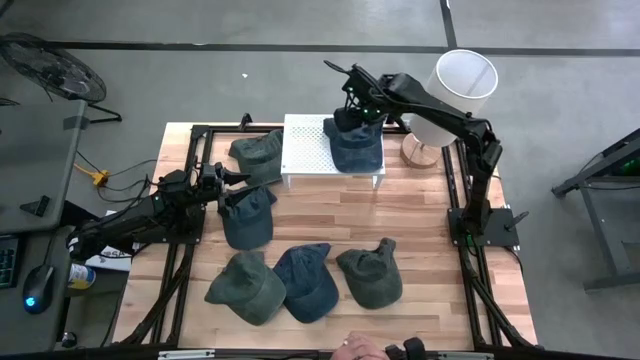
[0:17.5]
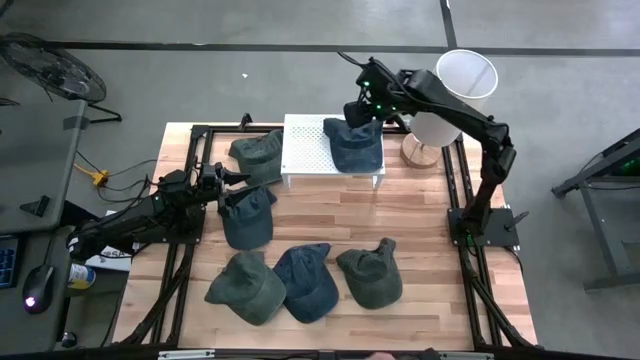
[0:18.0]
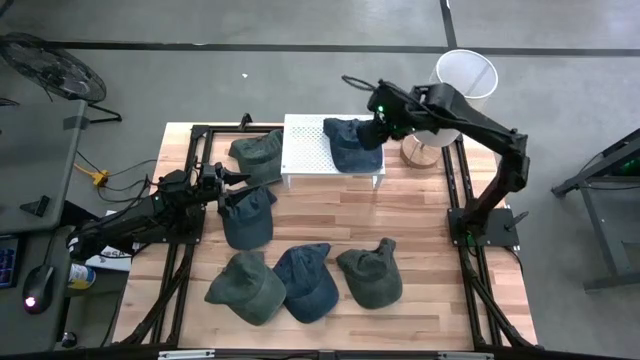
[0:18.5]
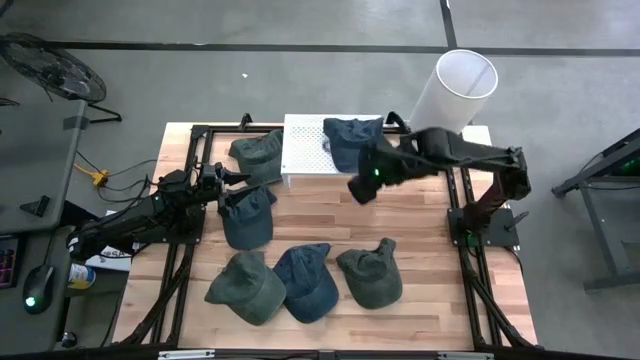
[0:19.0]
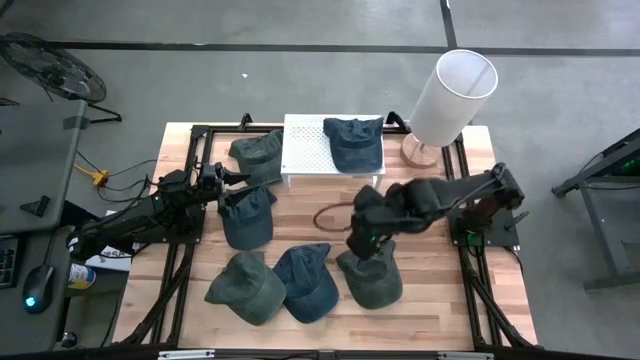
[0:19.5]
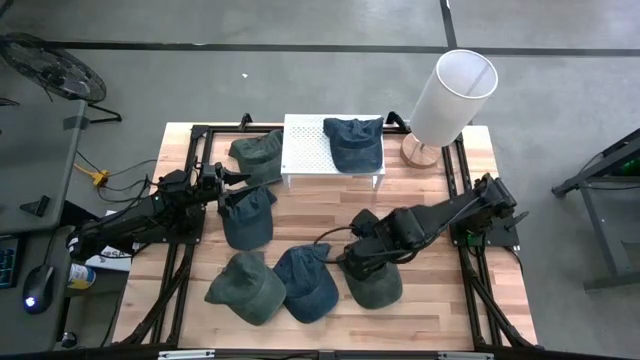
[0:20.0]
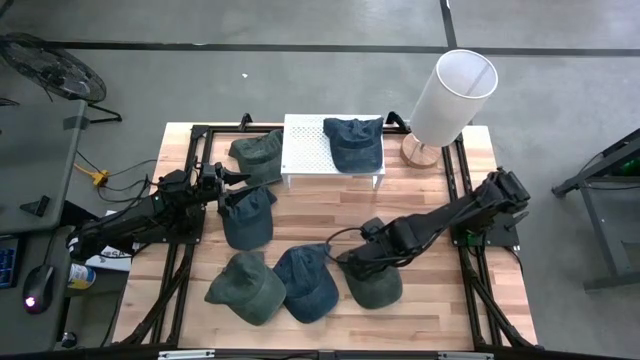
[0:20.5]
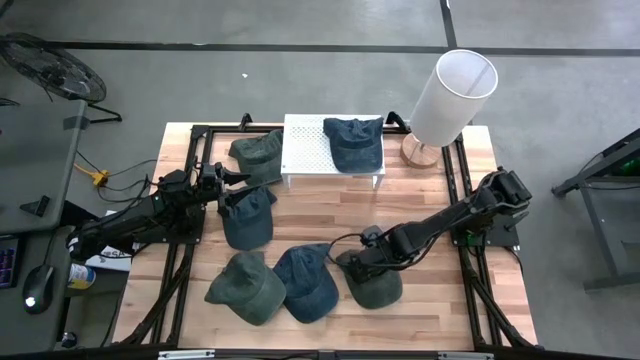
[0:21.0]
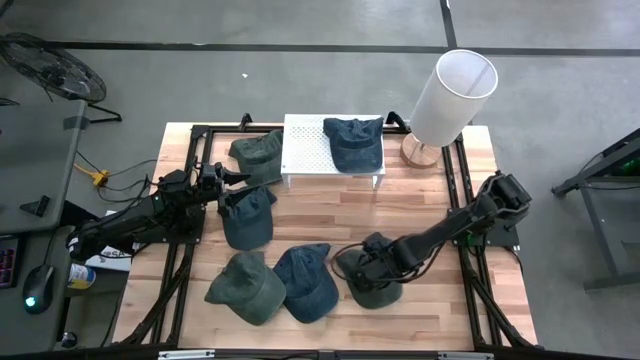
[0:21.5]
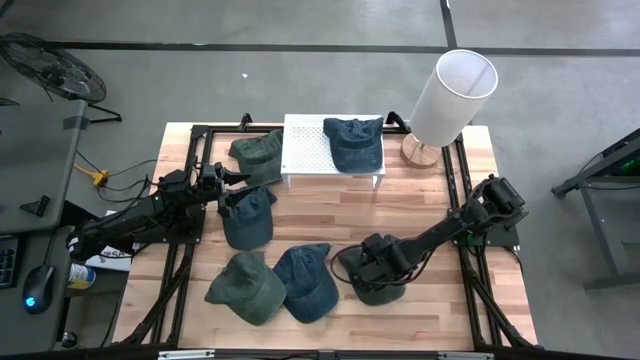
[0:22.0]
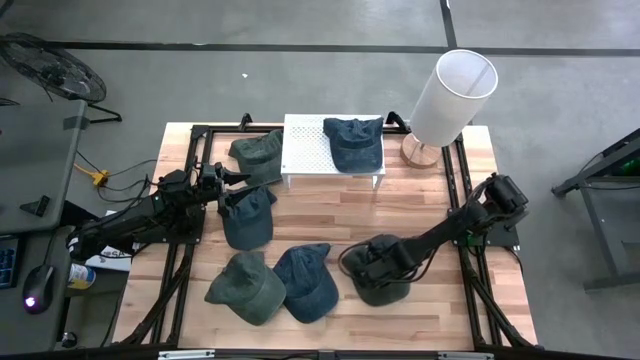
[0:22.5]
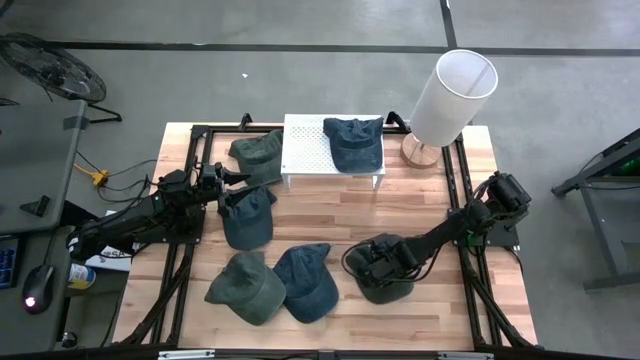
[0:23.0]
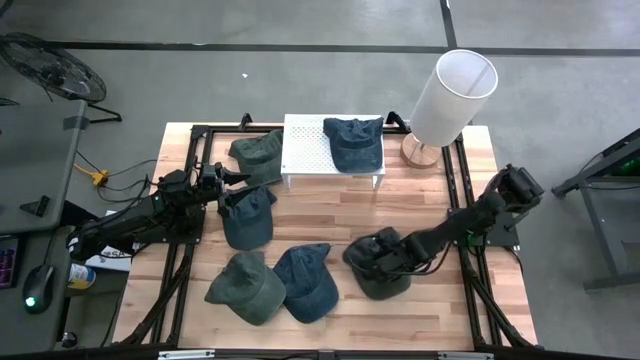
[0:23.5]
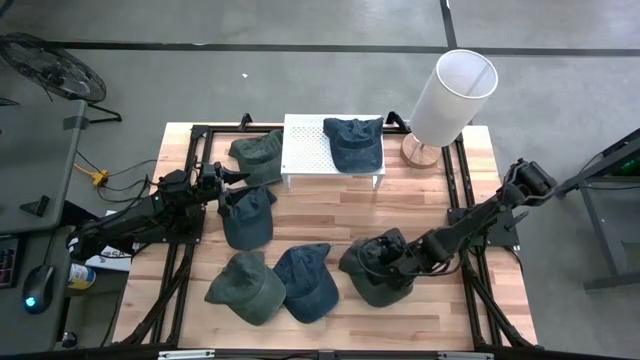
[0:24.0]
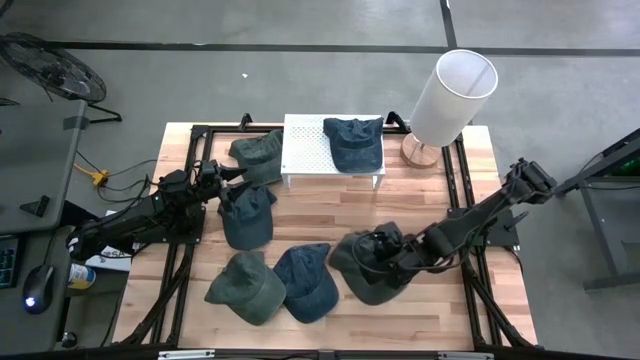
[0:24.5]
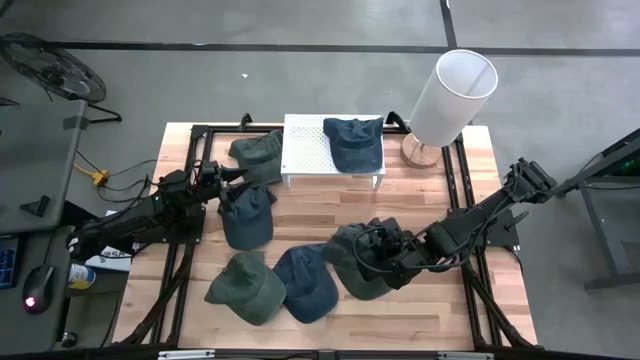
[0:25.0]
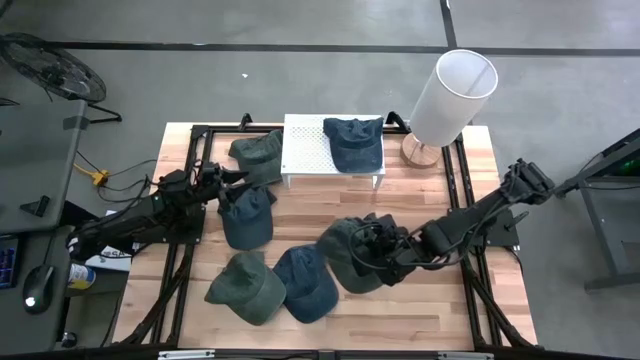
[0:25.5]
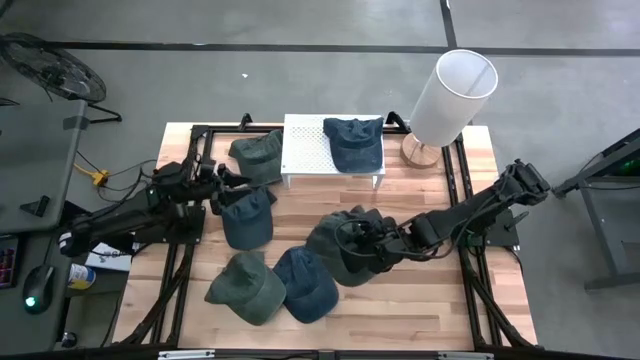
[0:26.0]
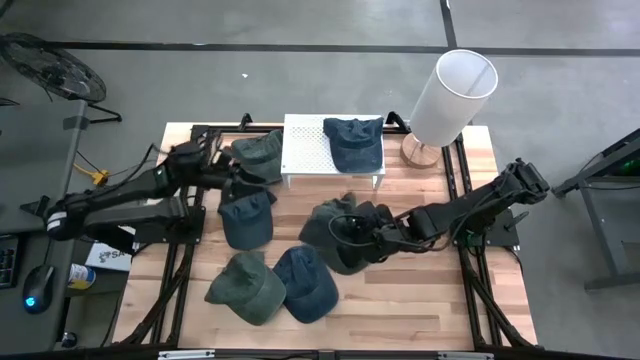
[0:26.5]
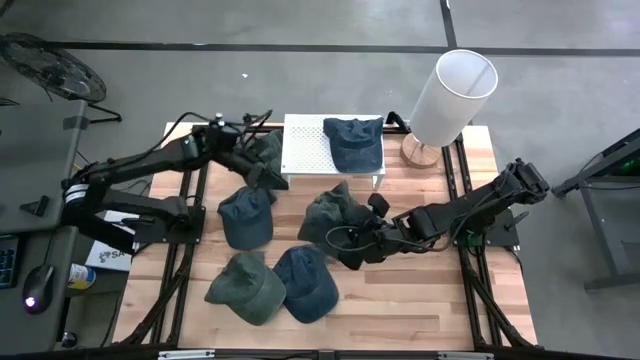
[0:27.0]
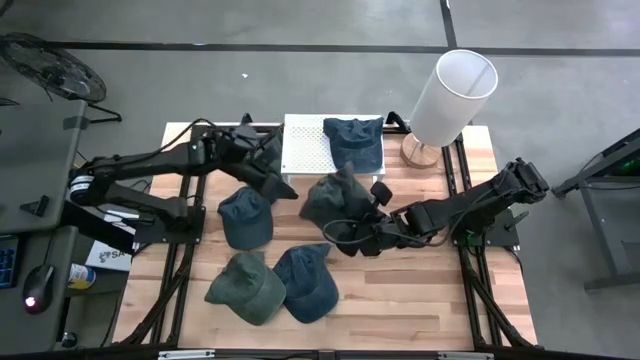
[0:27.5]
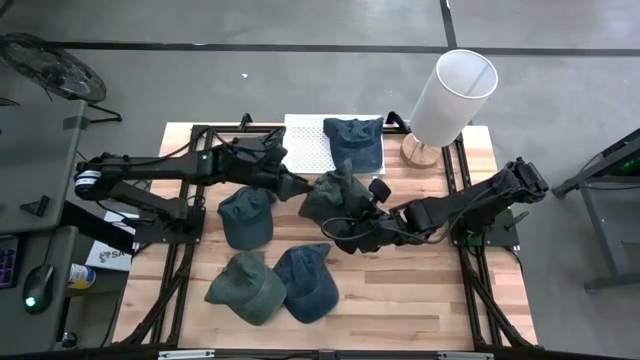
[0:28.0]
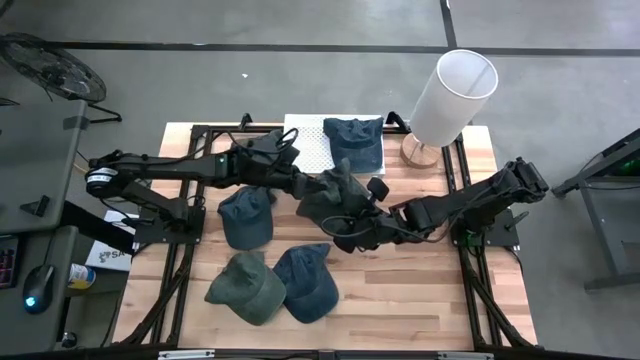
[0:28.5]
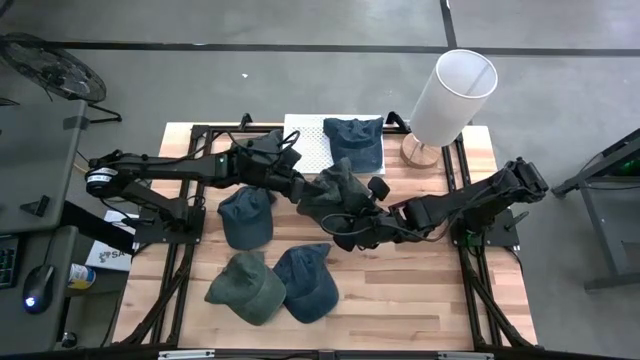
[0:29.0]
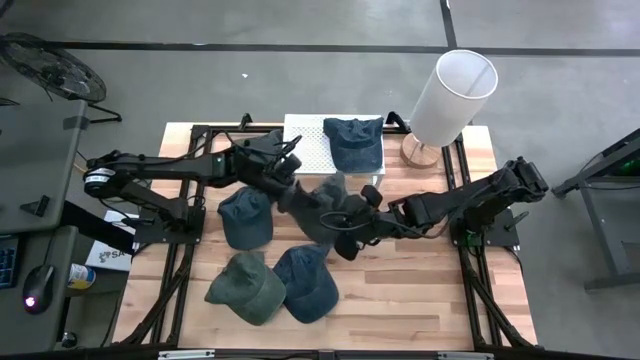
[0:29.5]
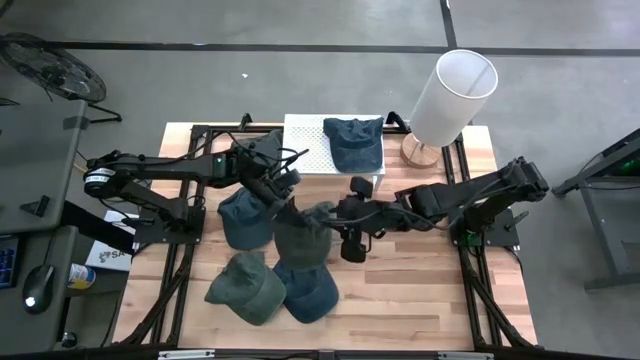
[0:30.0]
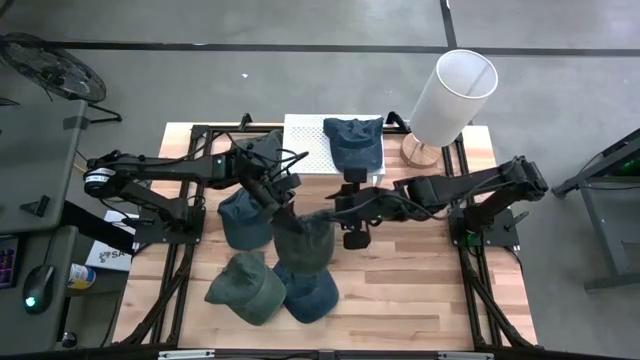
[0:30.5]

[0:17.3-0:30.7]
Task: Pick & Place hat
Put the dark green cap on the shelf

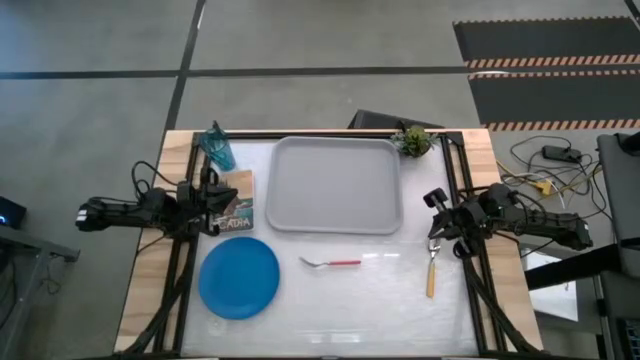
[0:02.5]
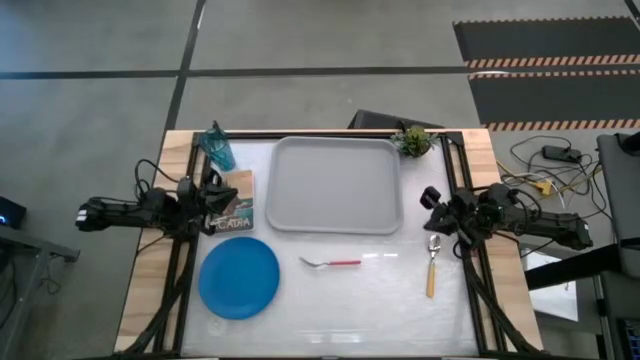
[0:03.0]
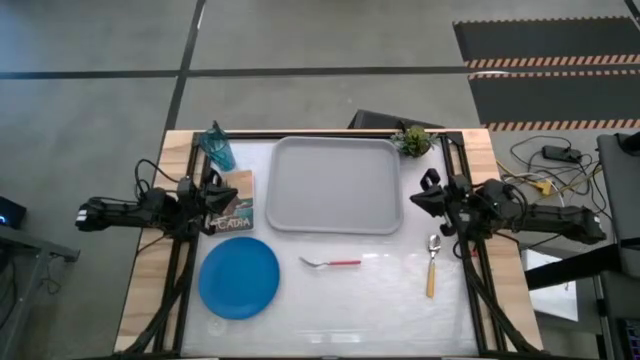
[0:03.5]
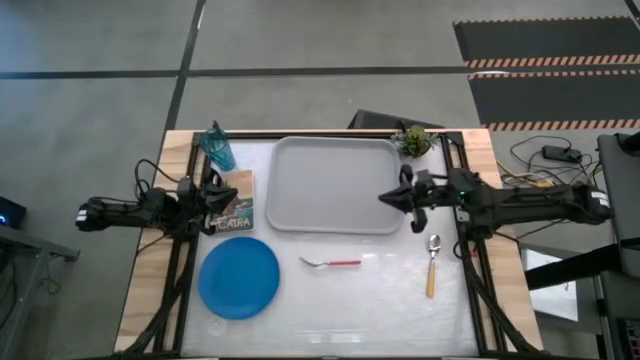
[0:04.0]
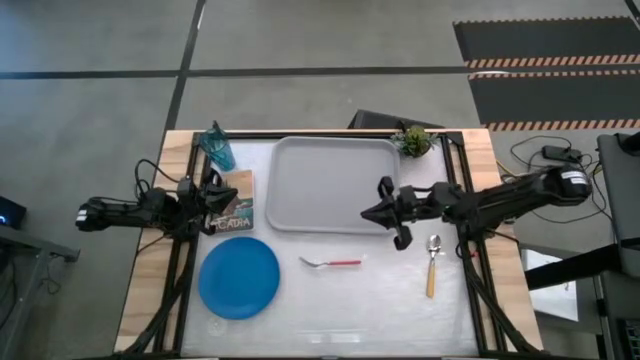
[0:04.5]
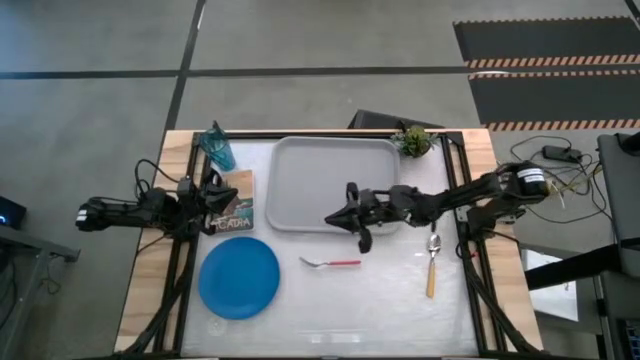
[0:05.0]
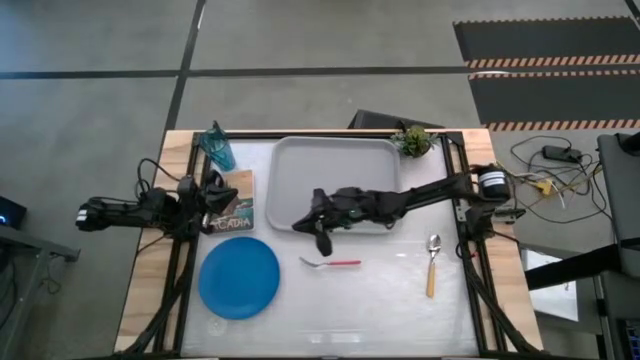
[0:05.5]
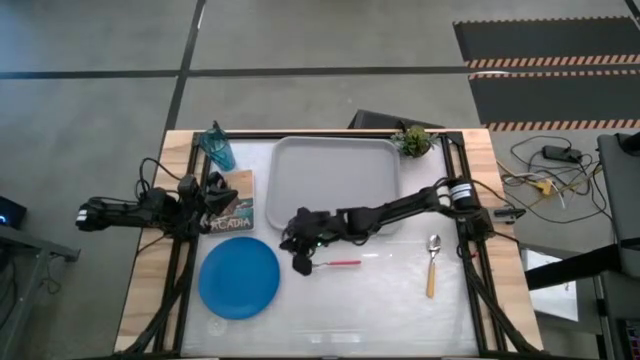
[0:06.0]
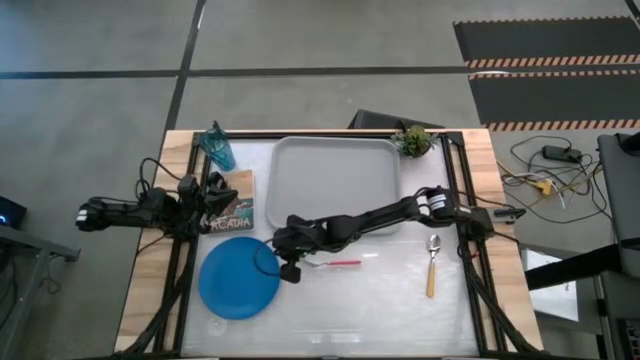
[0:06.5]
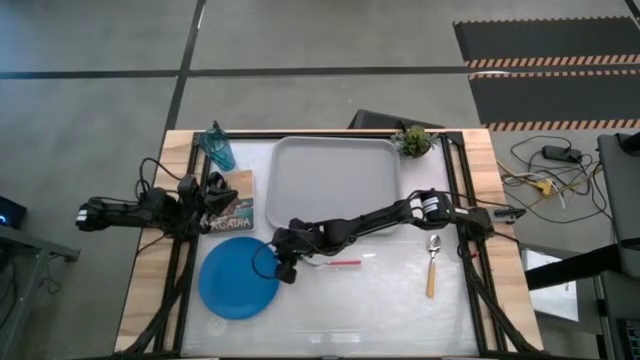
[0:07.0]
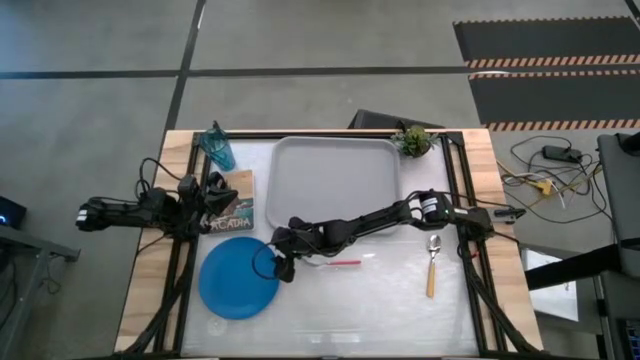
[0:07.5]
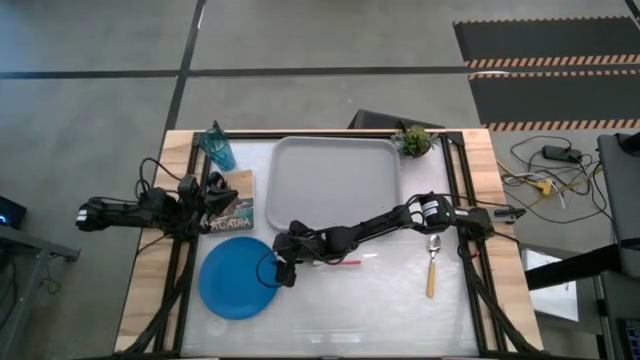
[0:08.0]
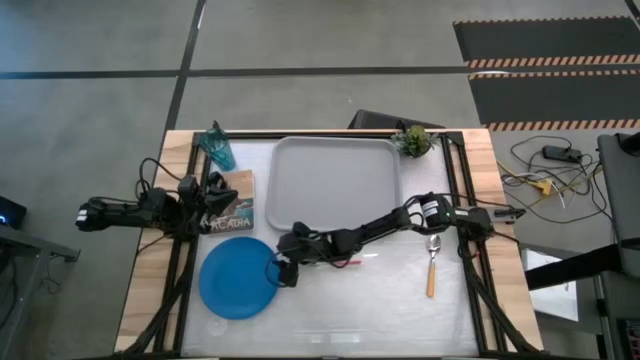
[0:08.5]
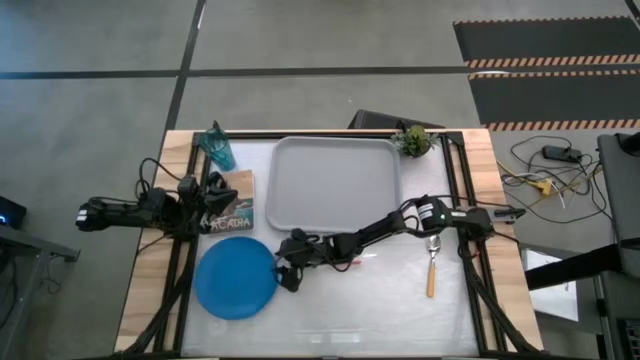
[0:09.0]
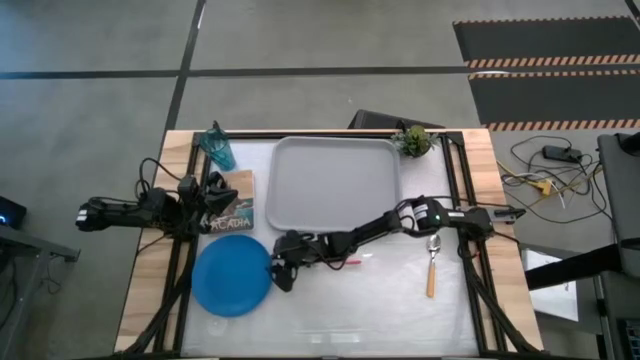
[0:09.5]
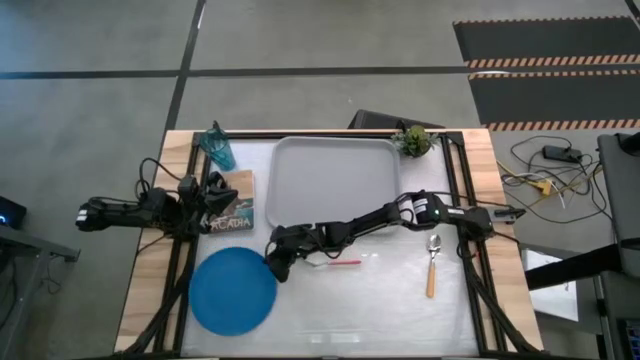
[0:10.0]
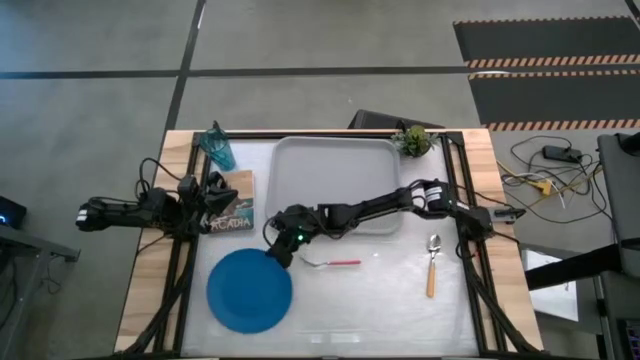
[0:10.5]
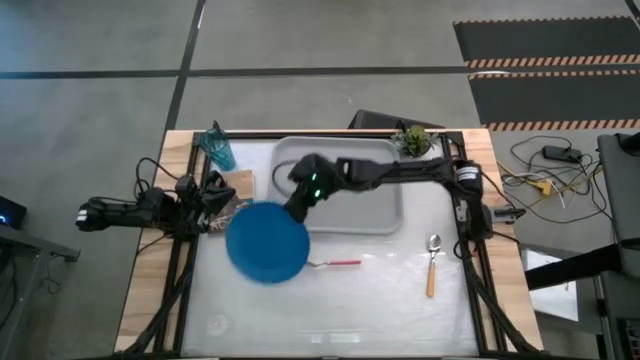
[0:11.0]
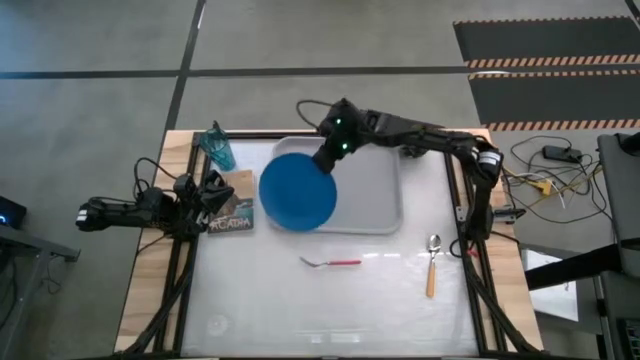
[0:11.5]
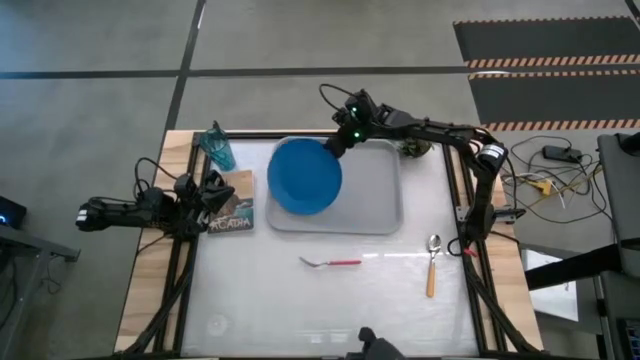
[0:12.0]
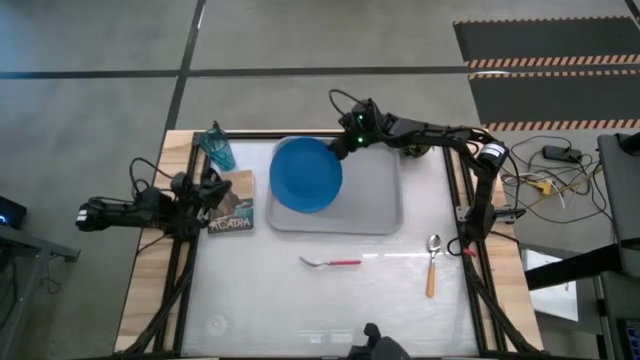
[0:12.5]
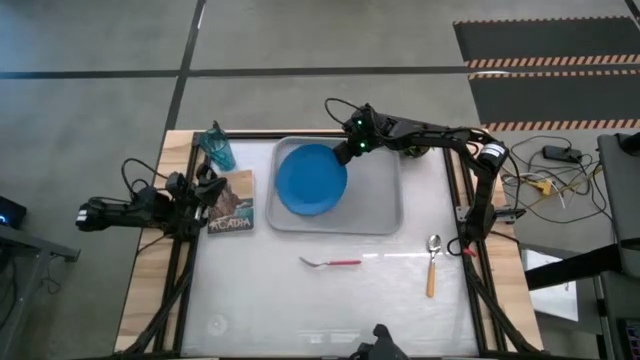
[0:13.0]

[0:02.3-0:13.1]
Task: Pick and place plate/cup/fork/spoon on tray
Put the blue plate on the left side of the gray tray
